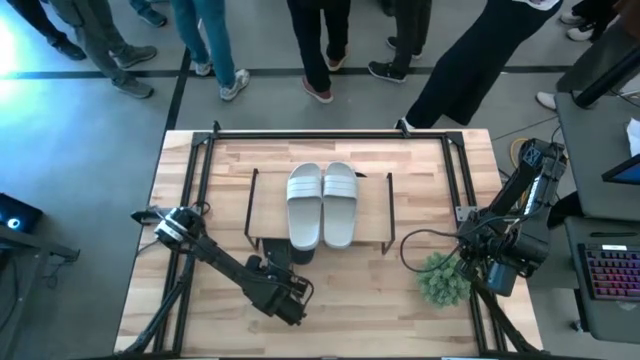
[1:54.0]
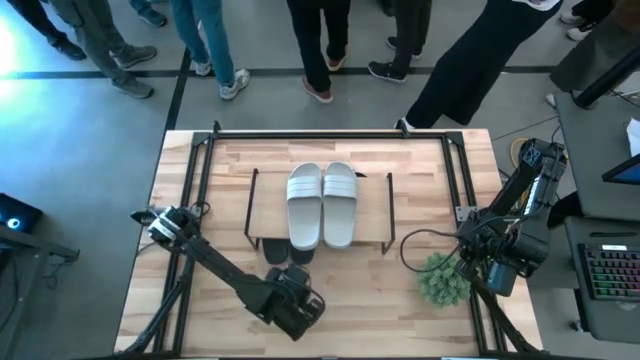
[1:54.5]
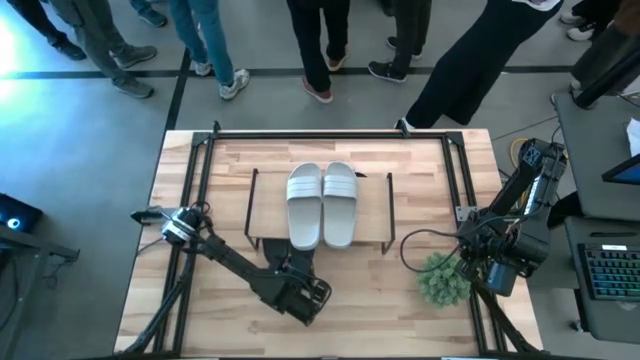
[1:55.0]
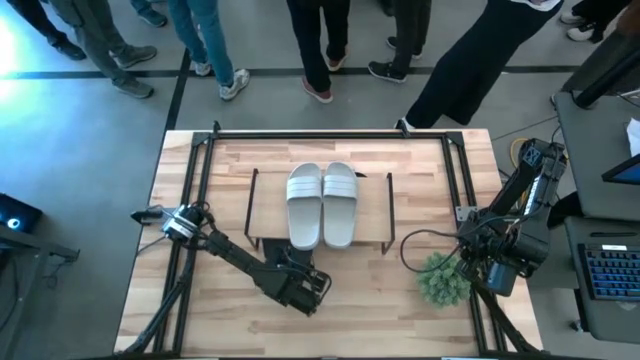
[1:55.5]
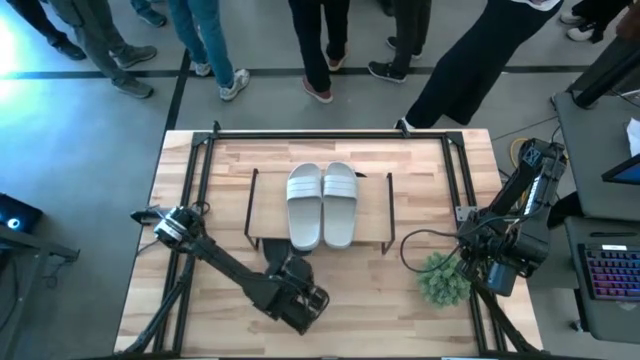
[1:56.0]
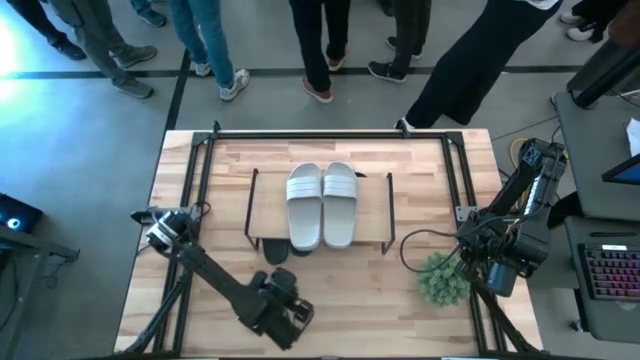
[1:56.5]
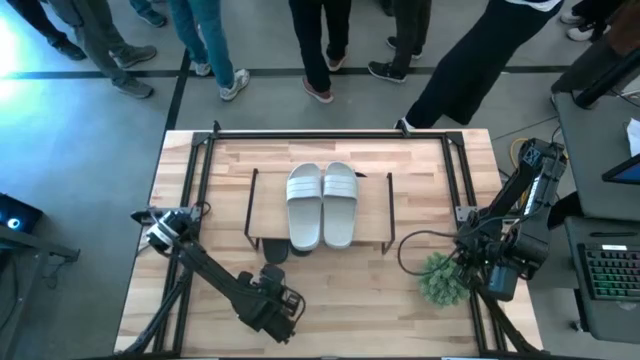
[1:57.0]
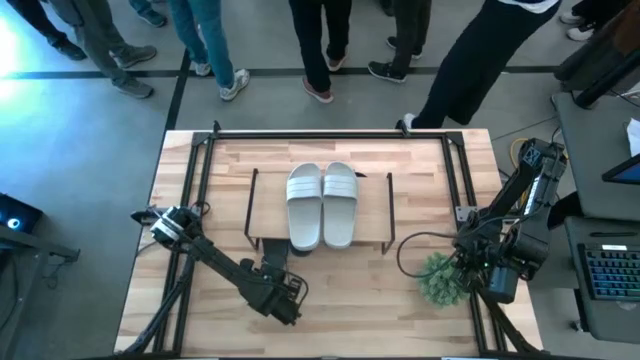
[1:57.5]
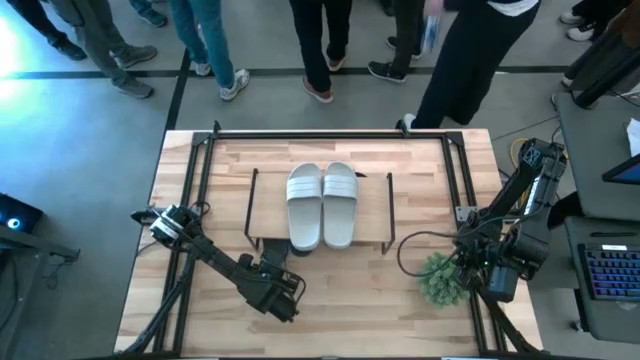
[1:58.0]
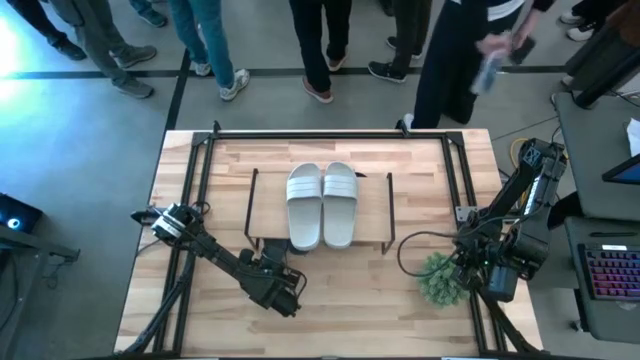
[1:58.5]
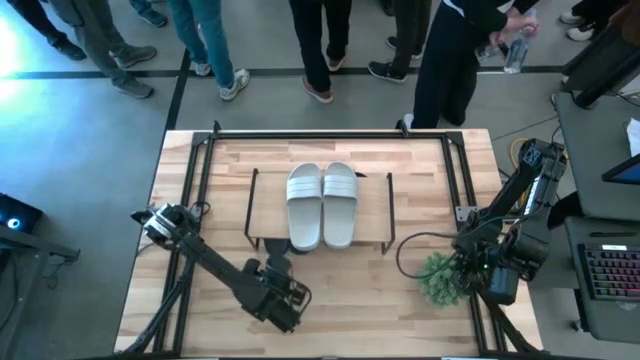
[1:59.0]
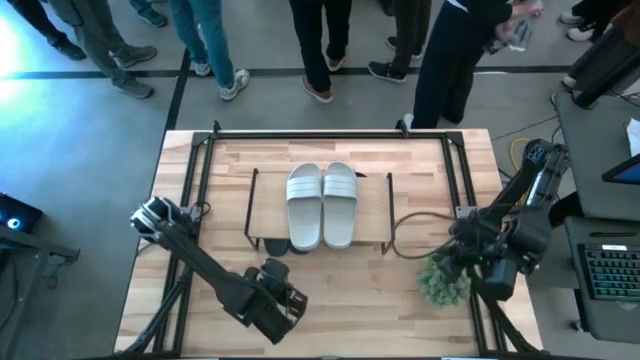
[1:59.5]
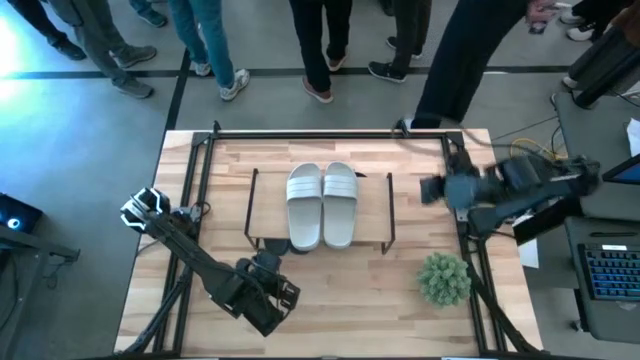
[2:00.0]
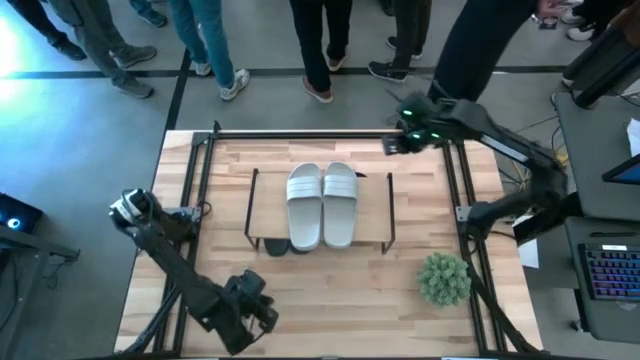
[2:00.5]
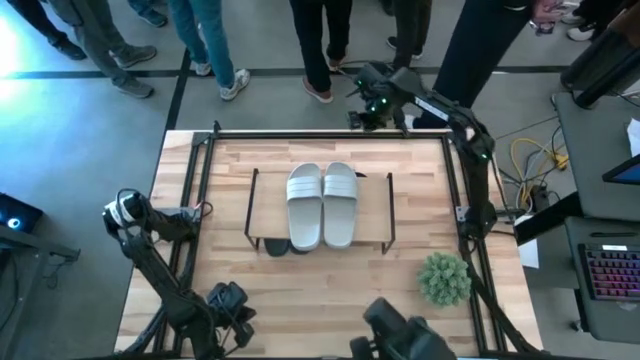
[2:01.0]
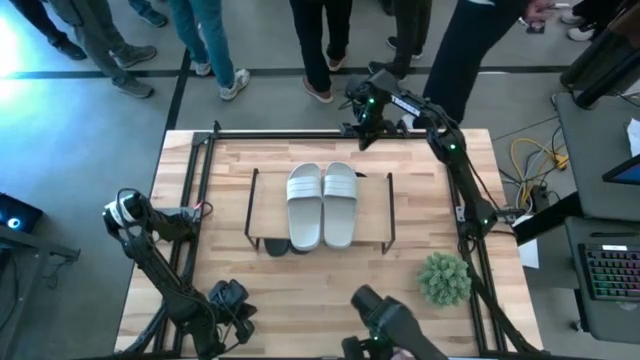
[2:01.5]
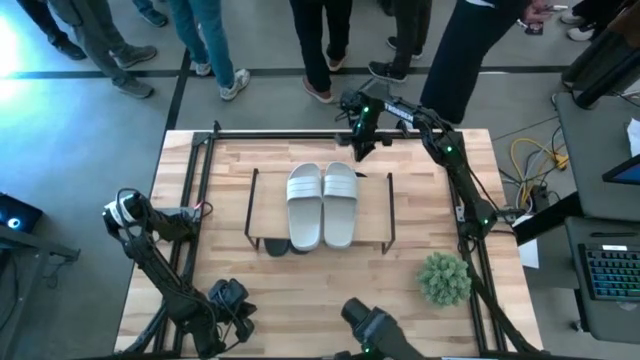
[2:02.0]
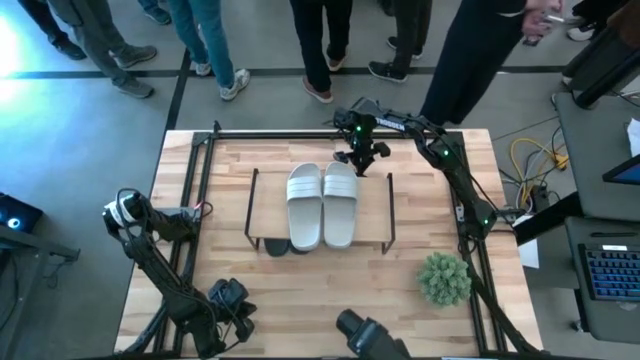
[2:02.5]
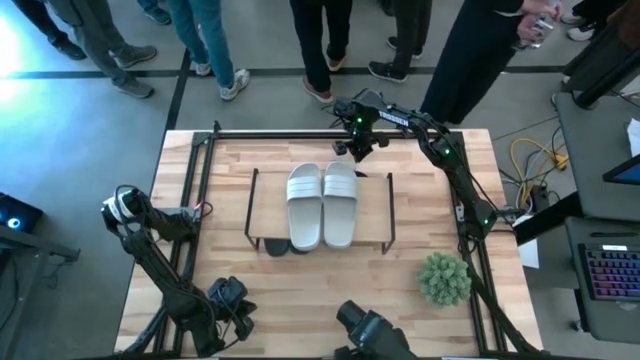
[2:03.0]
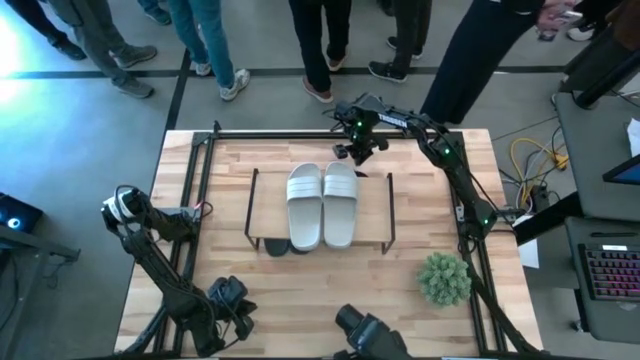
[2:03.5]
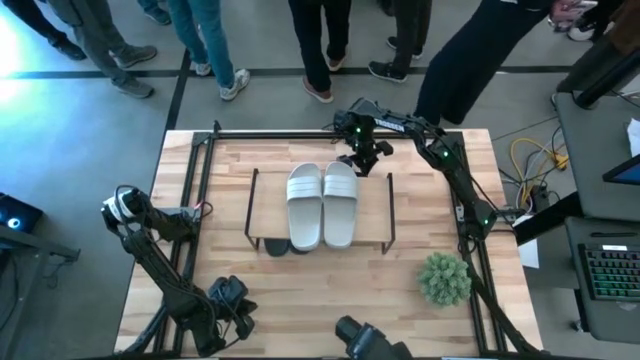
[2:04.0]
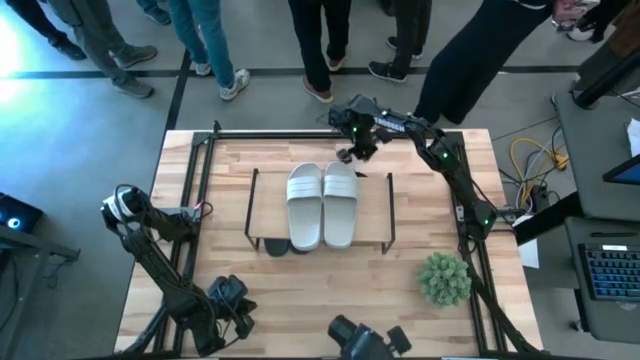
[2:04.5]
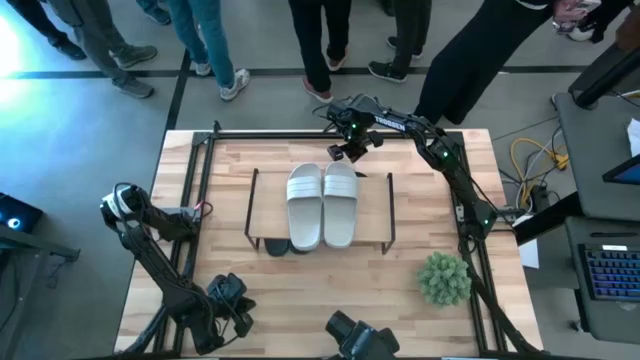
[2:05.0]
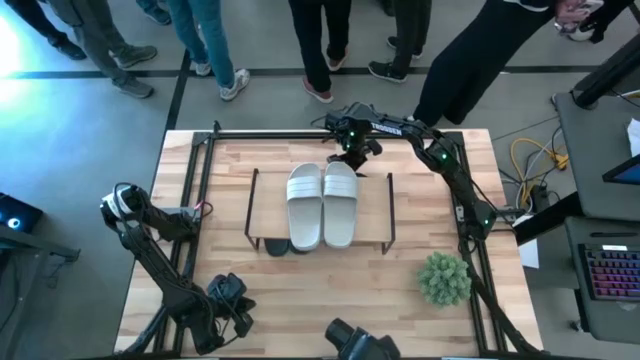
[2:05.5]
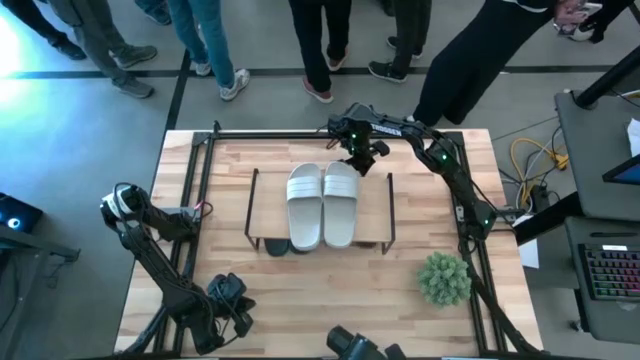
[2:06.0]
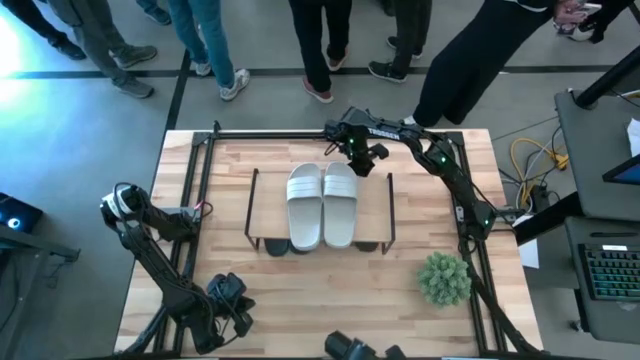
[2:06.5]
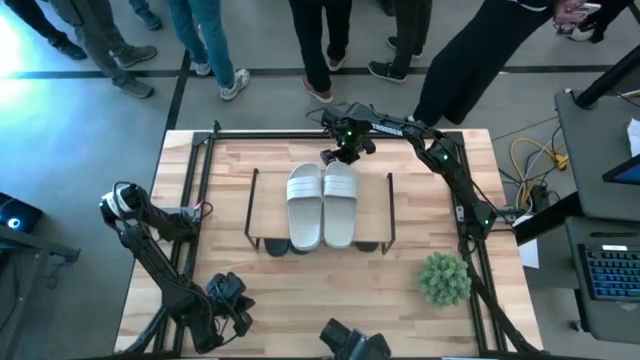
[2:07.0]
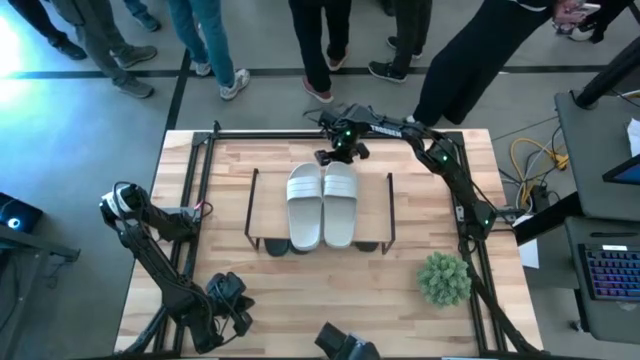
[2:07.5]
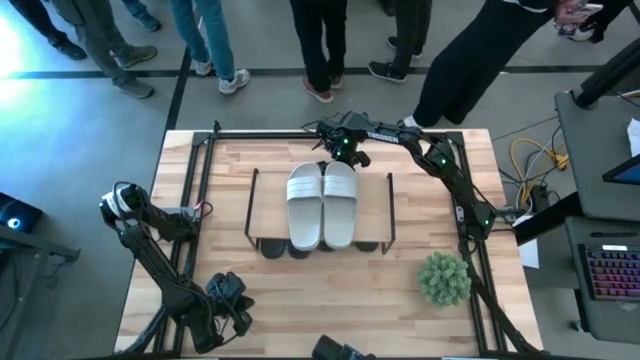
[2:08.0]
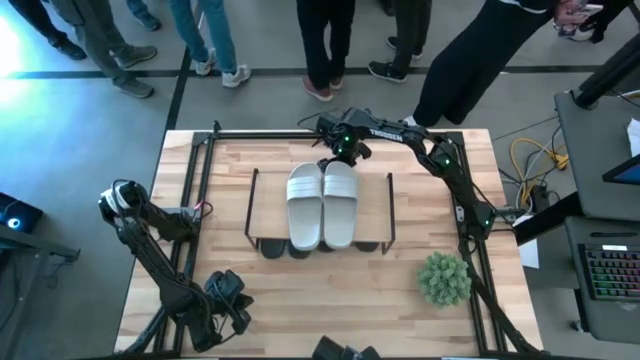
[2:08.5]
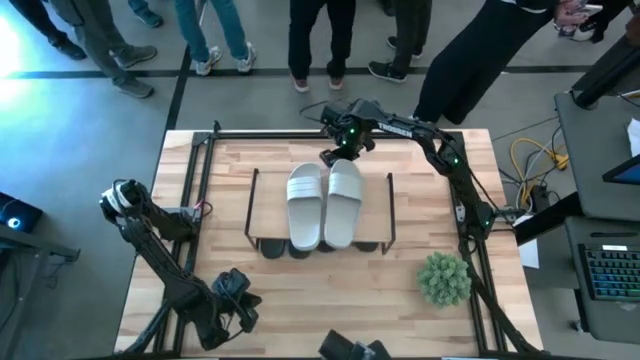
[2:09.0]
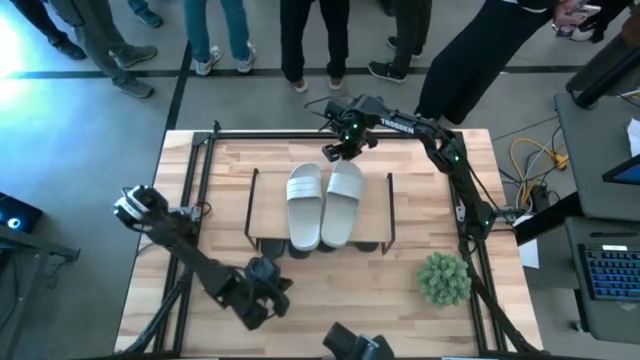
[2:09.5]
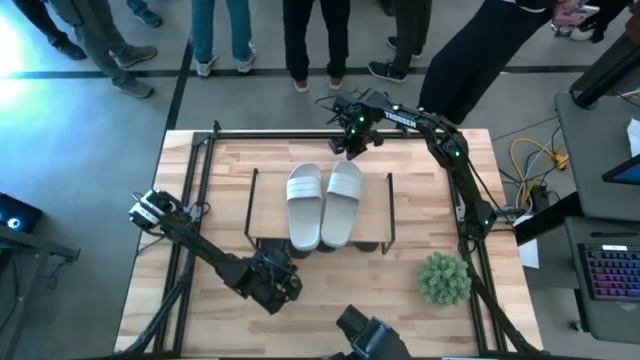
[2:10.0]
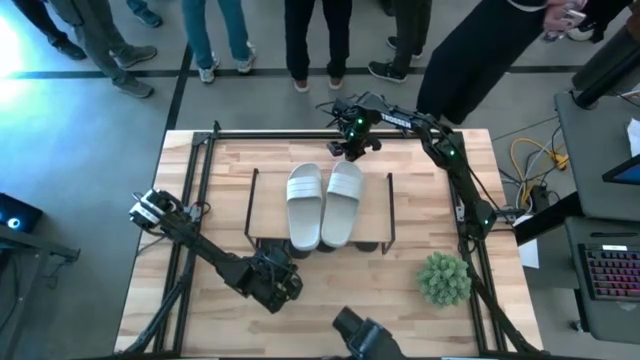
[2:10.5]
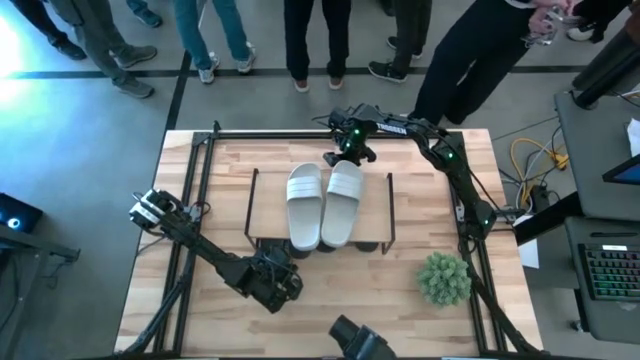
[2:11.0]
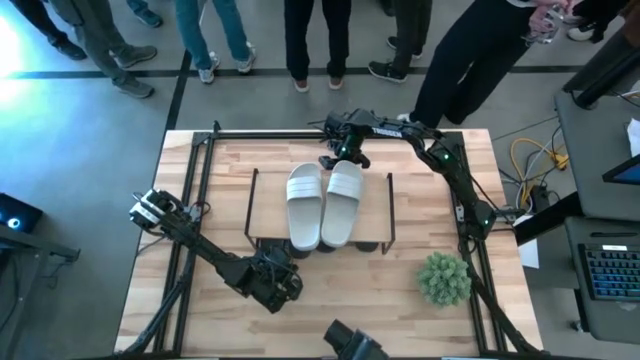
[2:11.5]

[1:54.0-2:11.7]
Task: Pick and place slides into the shelf
Adjust the slides on the shelf
